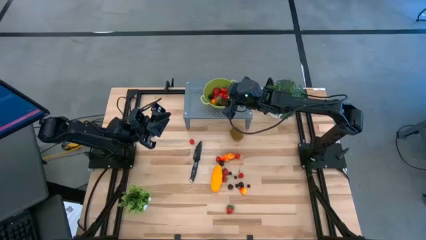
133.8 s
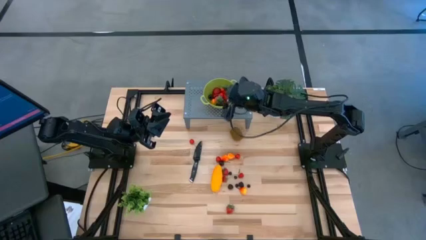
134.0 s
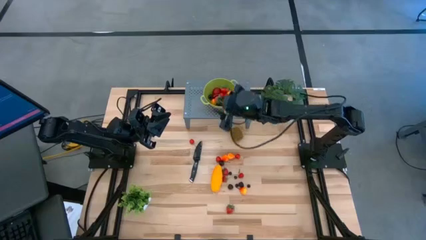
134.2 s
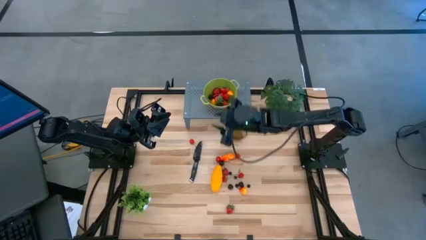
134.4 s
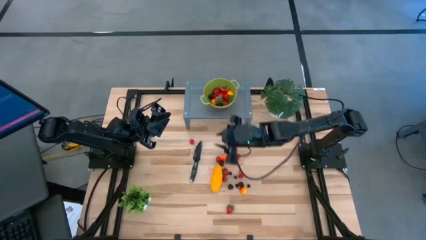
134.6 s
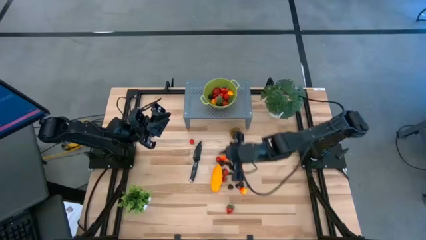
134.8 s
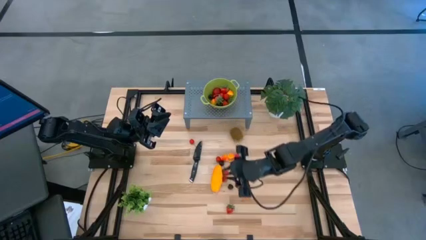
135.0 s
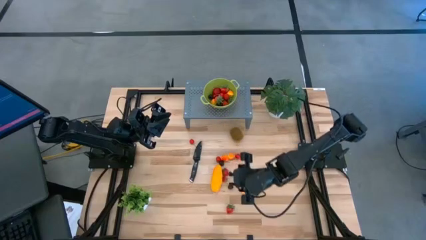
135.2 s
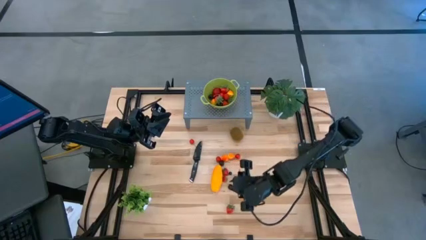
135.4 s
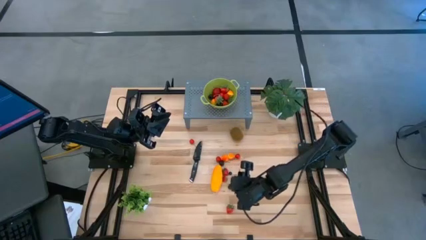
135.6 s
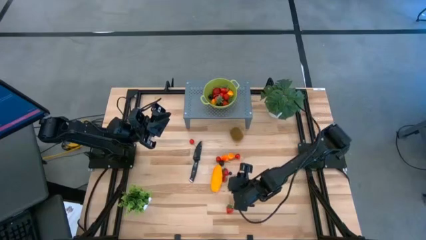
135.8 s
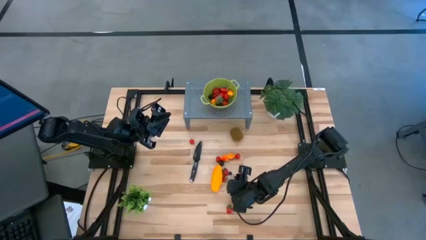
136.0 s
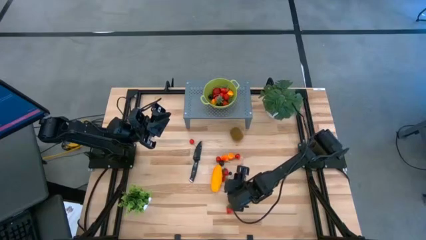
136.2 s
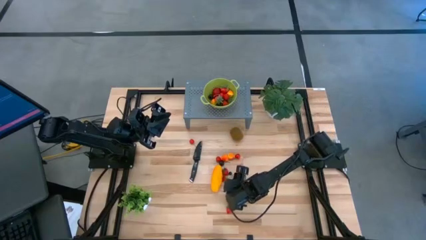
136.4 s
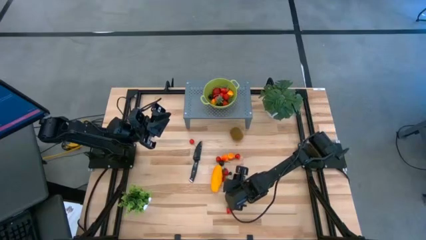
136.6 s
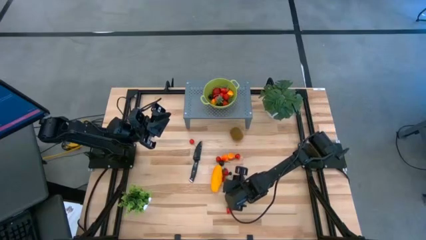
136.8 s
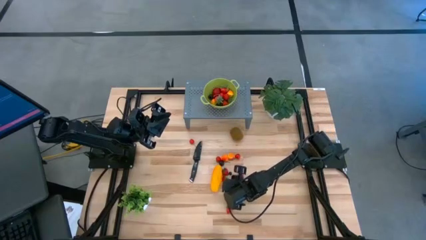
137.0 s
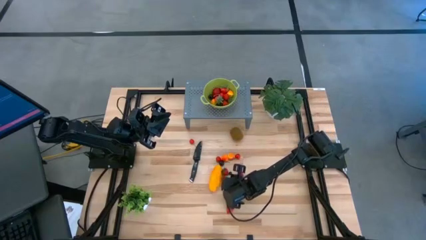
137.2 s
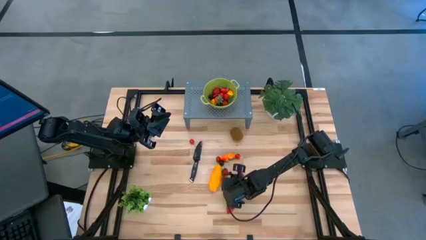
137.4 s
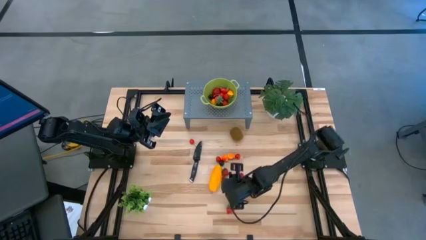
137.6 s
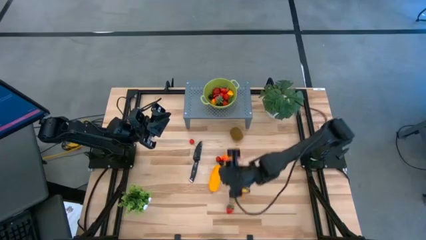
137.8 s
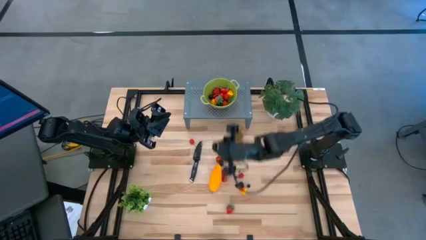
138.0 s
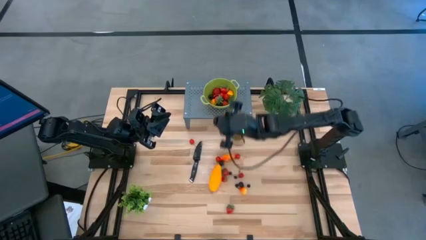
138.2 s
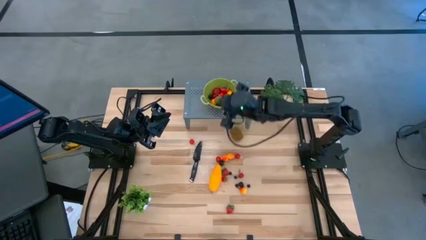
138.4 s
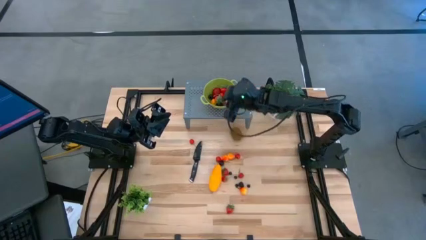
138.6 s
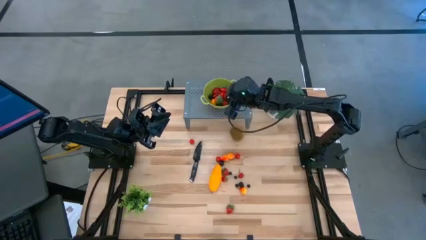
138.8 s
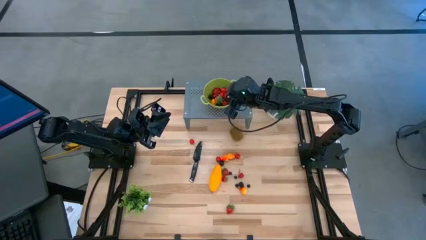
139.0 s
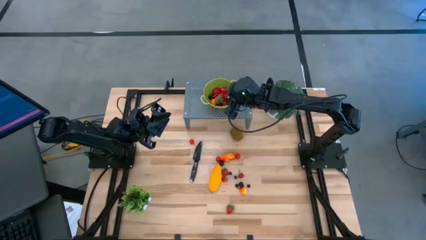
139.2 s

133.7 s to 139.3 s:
Task: Pick & Place Fruit
Put the black cherry into the green strainer bowl on the shelf

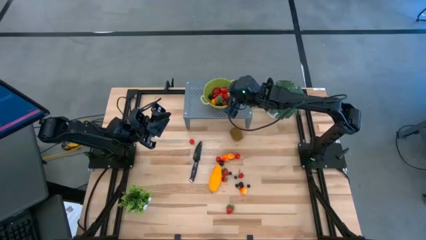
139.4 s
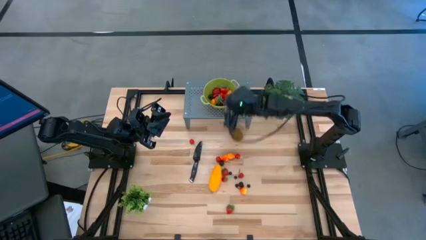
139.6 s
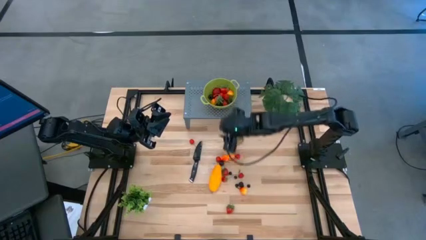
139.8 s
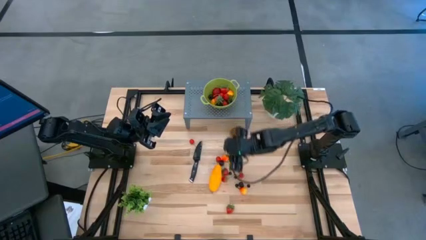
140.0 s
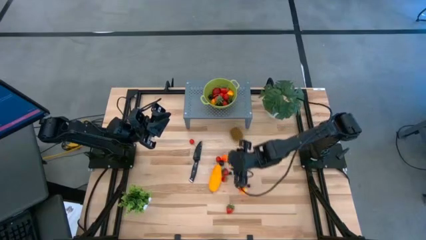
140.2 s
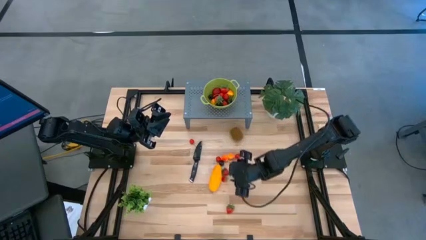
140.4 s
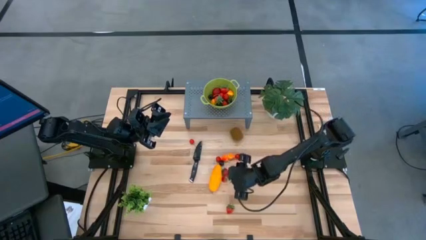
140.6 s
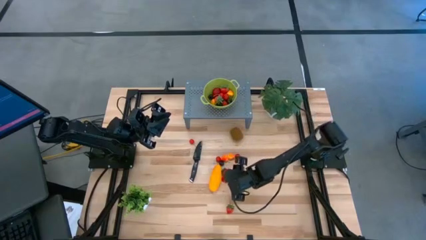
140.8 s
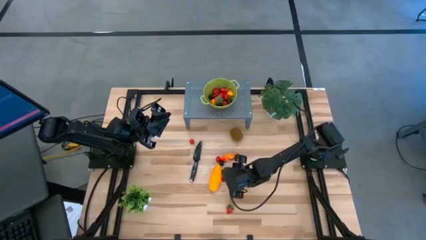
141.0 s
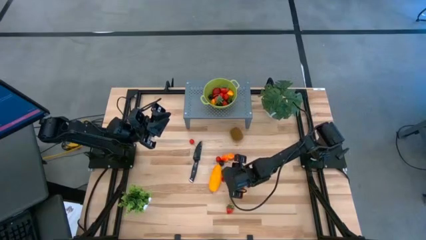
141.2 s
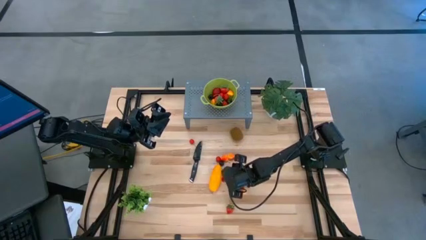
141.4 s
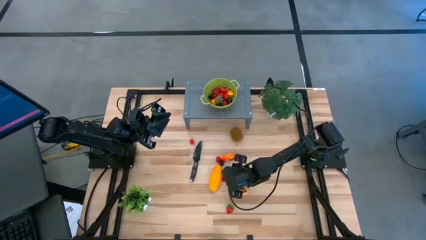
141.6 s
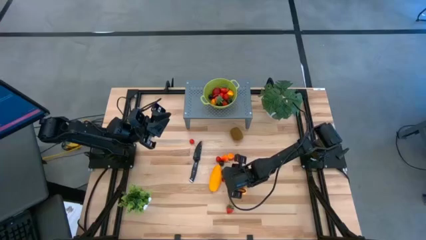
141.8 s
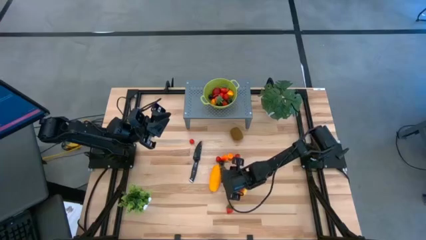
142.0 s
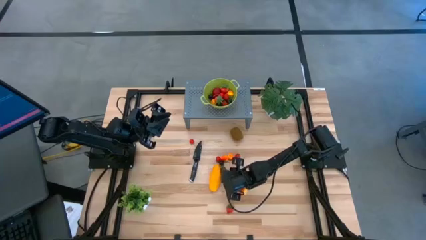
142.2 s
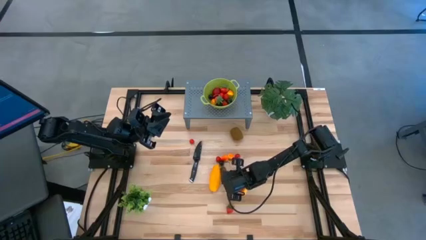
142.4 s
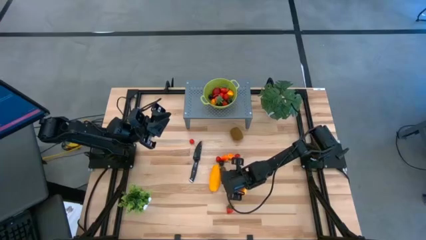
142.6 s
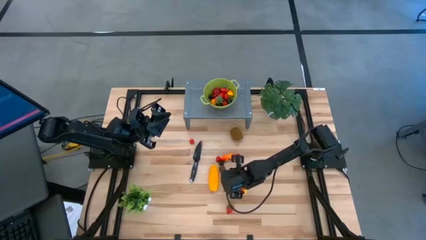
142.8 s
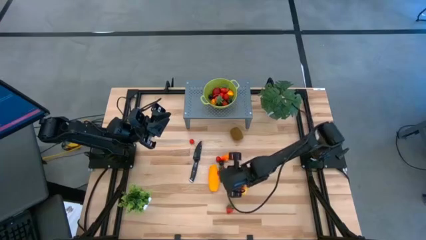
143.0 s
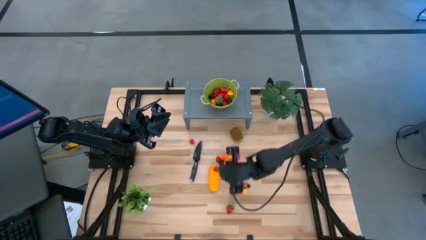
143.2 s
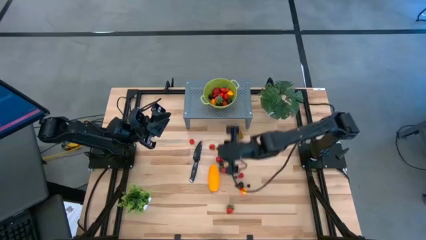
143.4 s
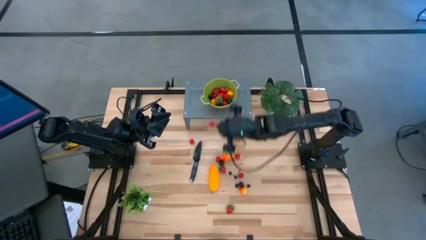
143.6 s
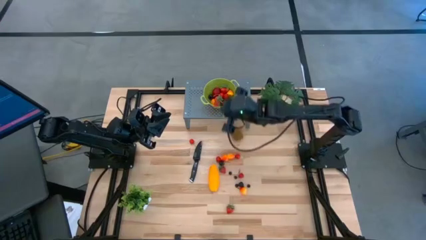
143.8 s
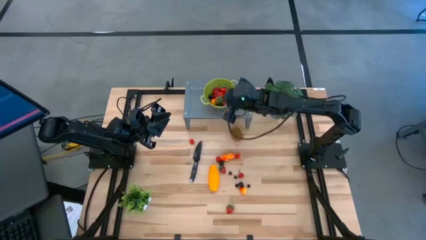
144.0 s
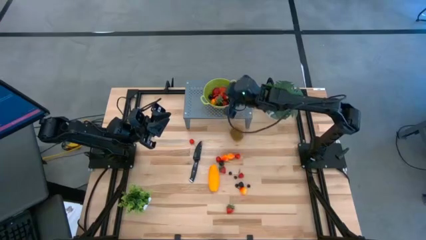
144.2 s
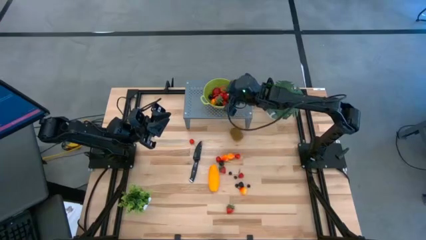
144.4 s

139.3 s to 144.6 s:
Put the strawberry into the green strainer bowl on the shelf

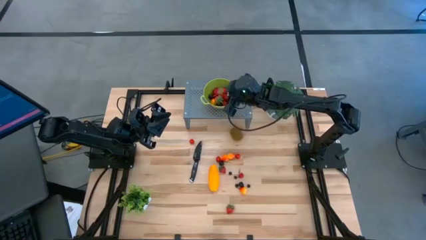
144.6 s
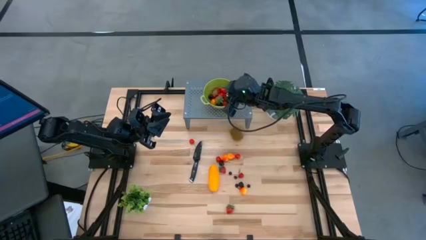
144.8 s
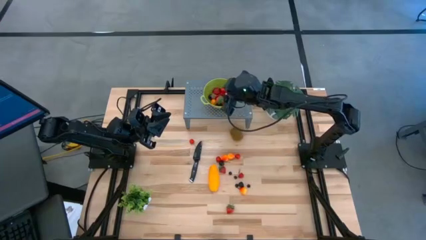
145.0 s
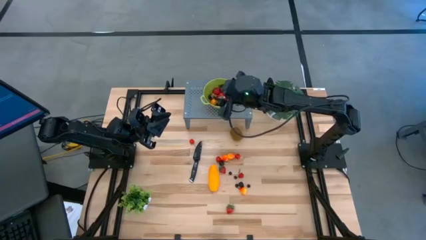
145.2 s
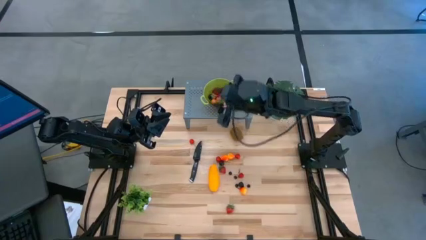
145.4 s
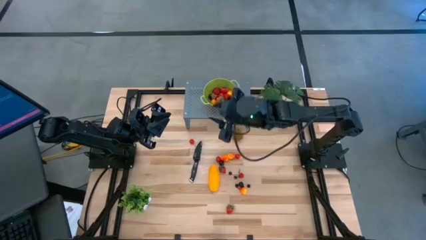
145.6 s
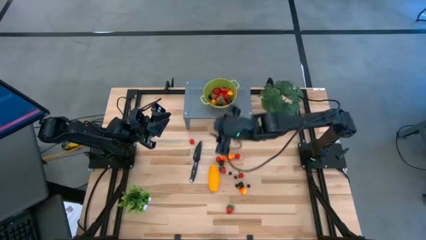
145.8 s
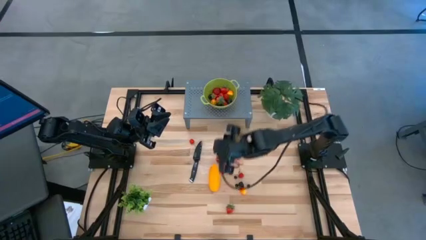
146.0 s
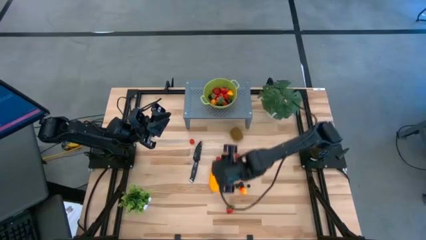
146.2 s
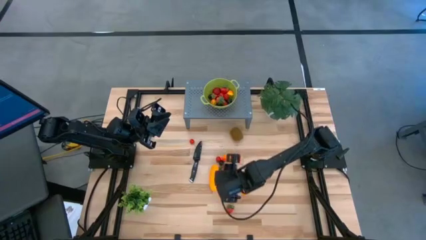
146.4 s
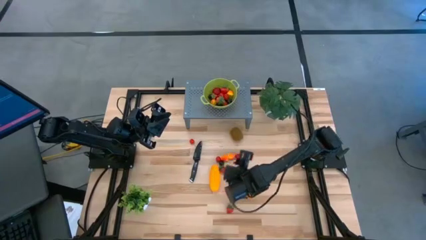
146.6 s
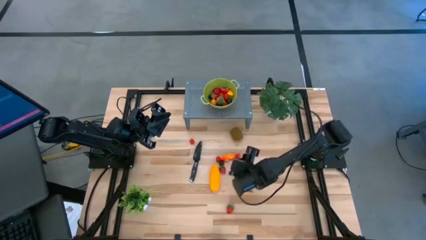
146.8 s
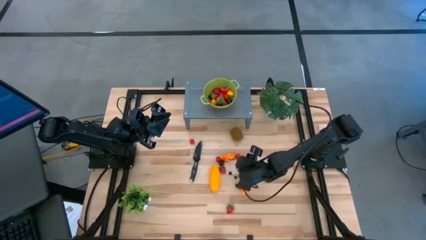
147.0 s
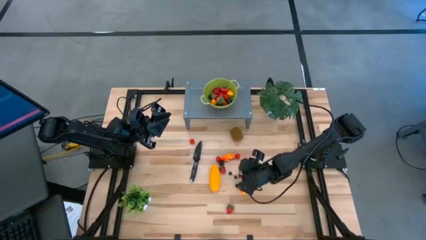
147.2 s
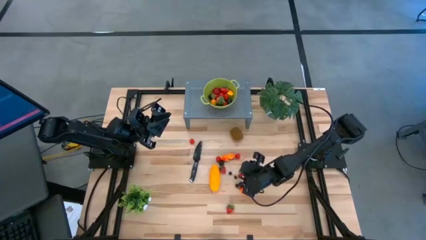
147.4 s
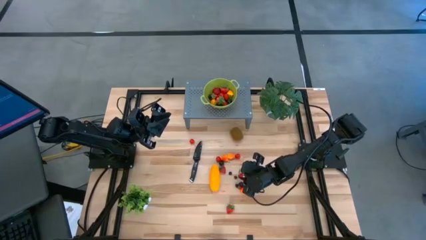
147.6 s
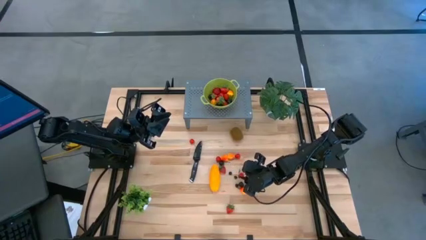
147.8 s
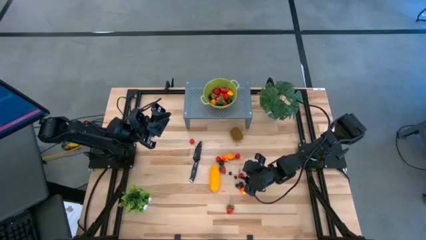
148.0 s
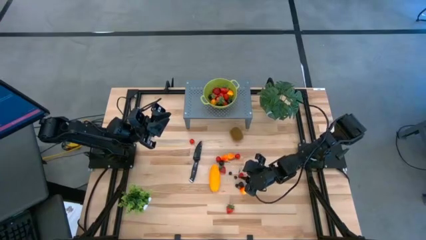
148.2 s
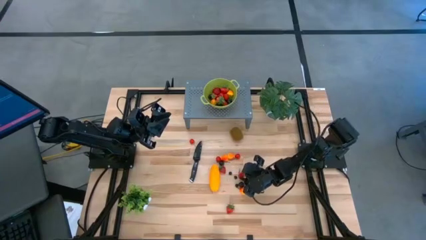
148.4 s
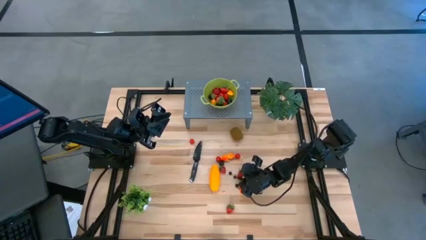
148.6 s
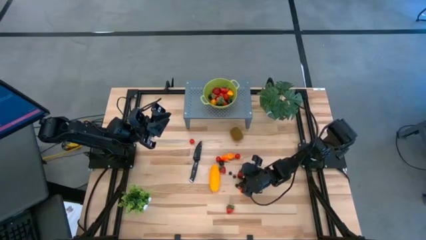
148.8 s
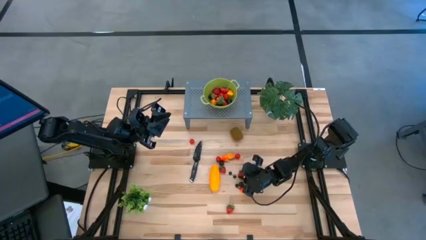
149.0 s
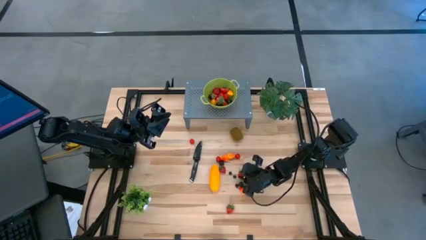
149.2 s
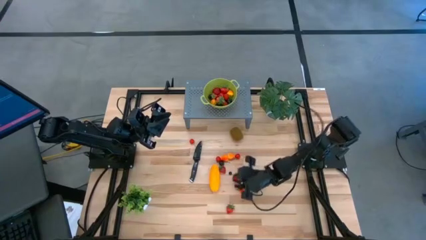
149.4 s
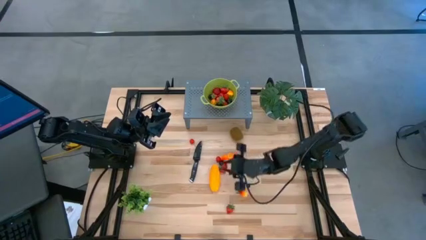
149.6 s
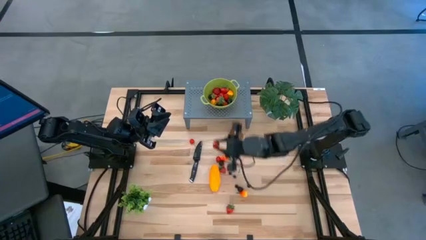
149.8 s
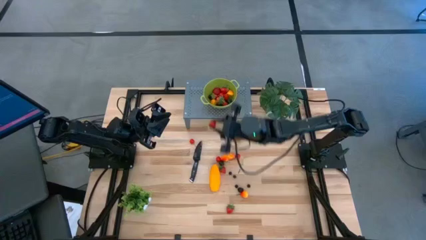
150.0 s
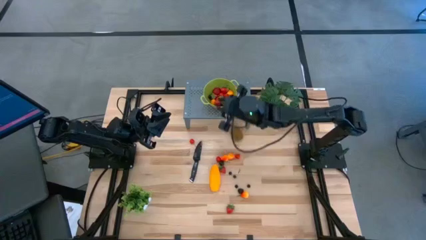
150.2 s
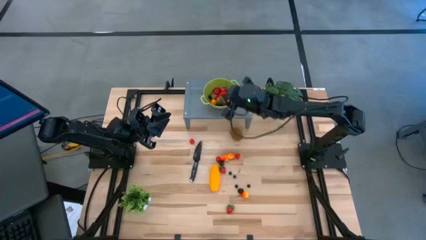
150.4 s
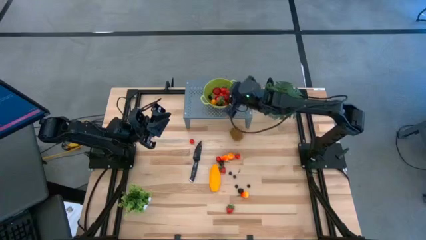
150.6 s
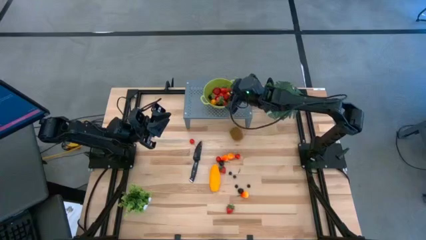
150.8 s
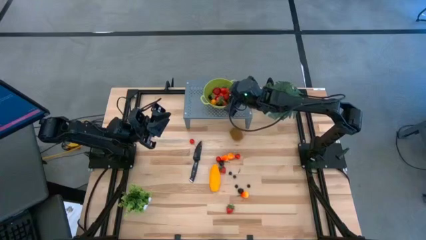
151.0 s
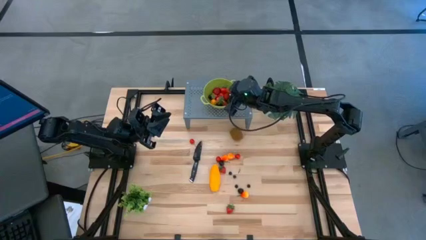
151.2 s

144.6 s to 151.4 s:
Put the raspberry into the green strainer bowl on the shelf
